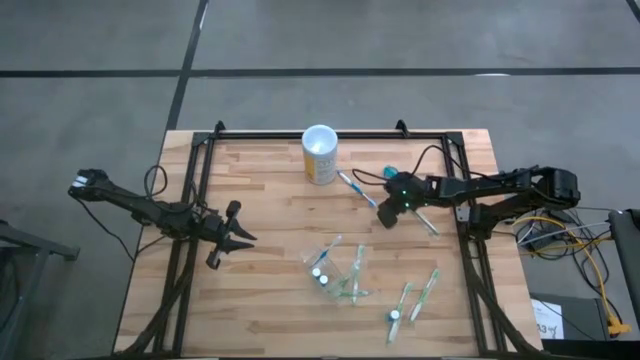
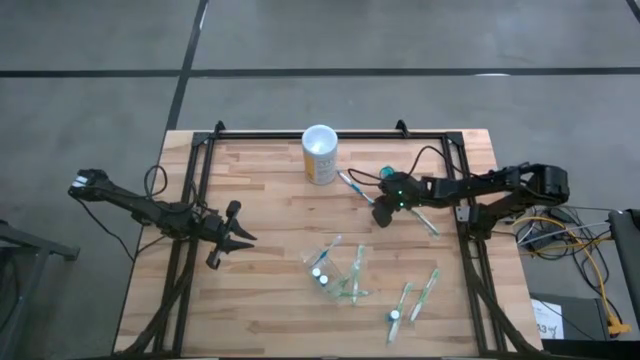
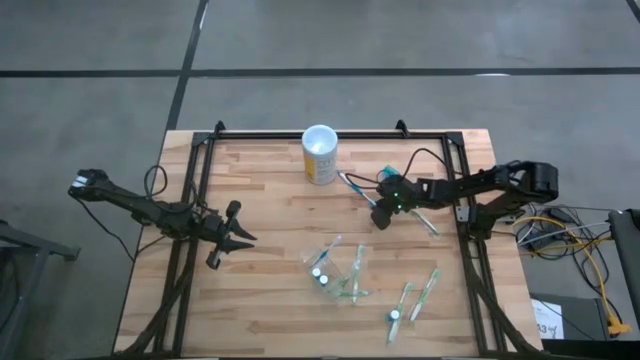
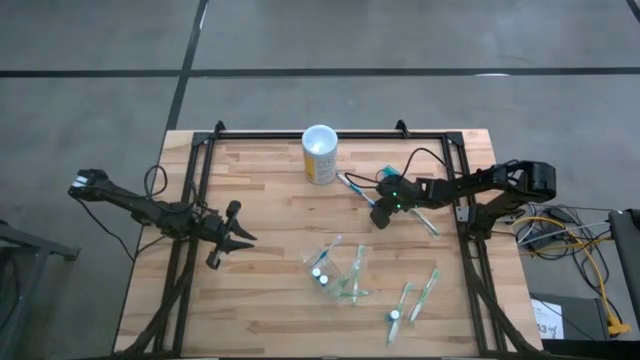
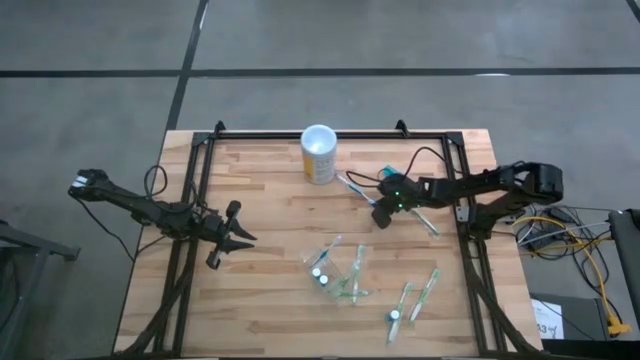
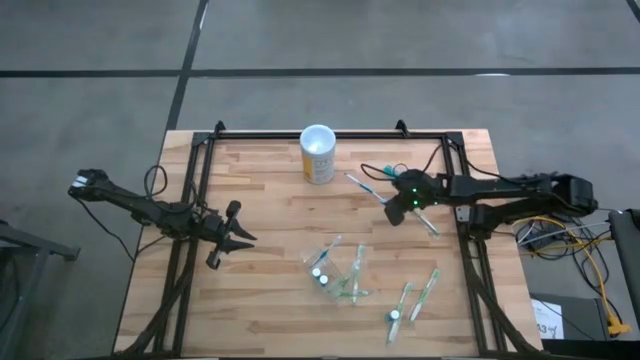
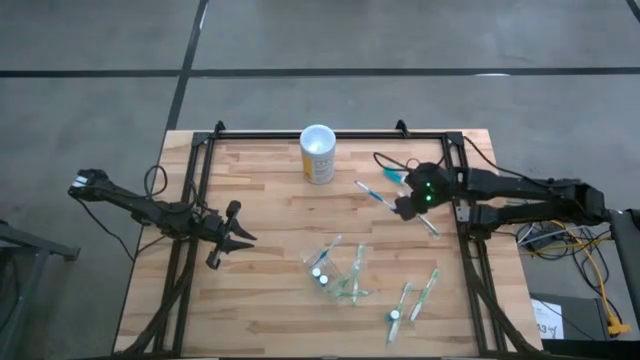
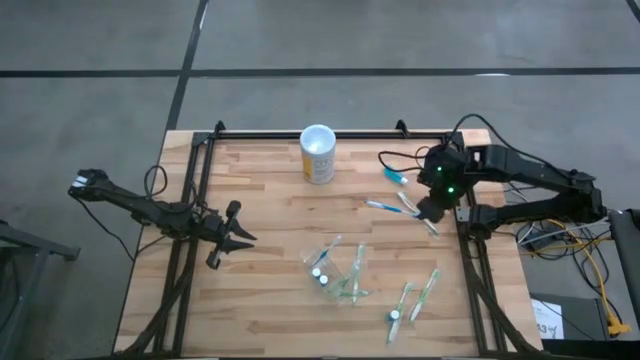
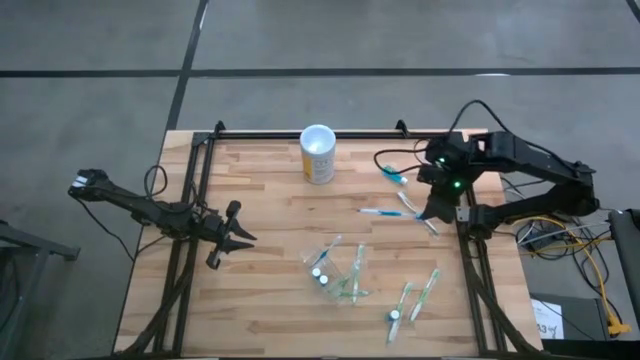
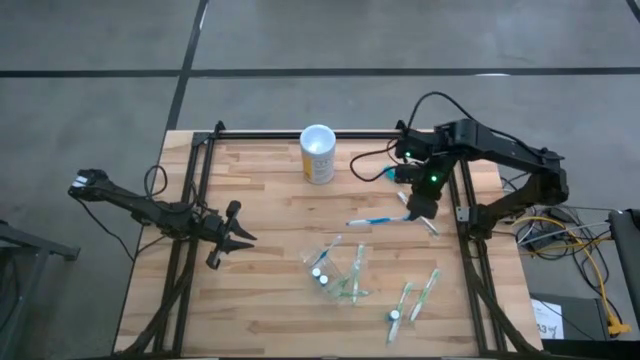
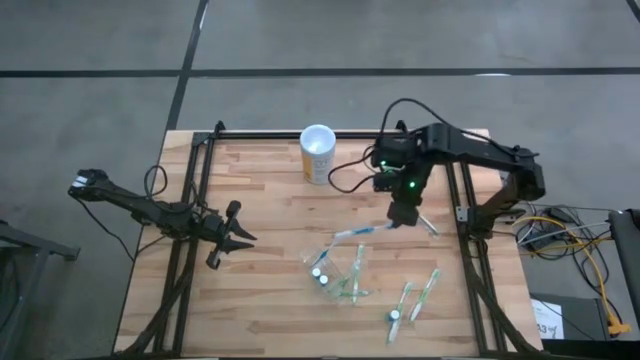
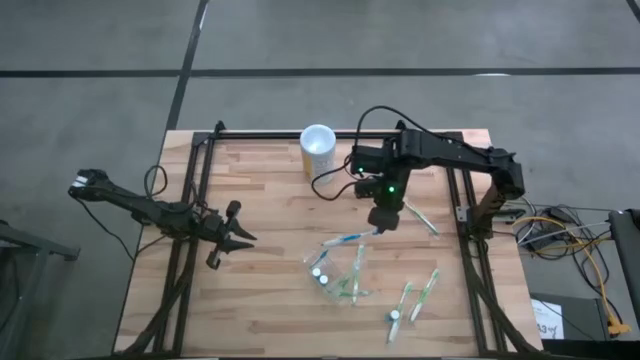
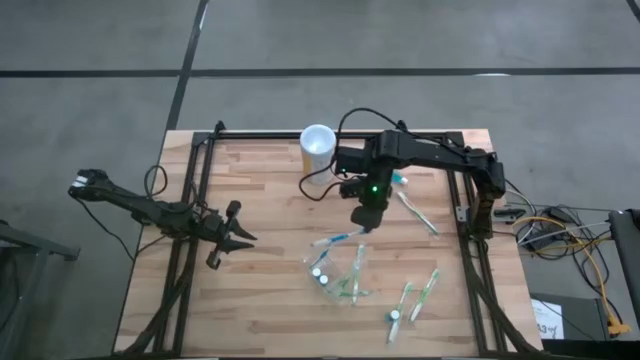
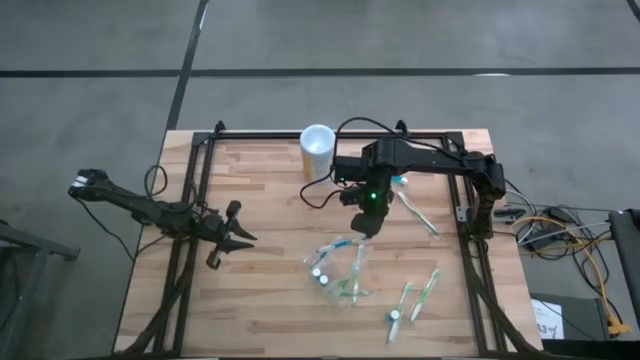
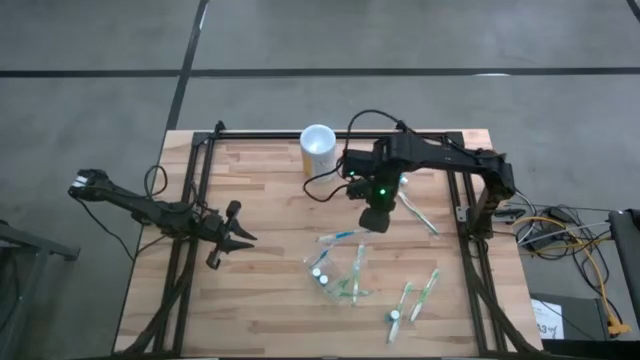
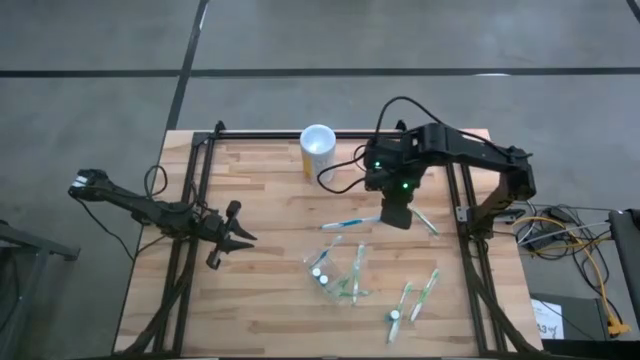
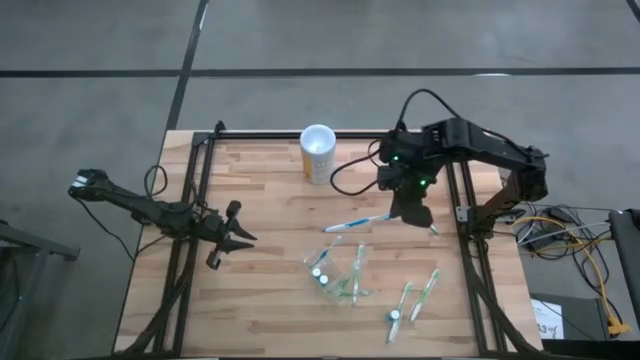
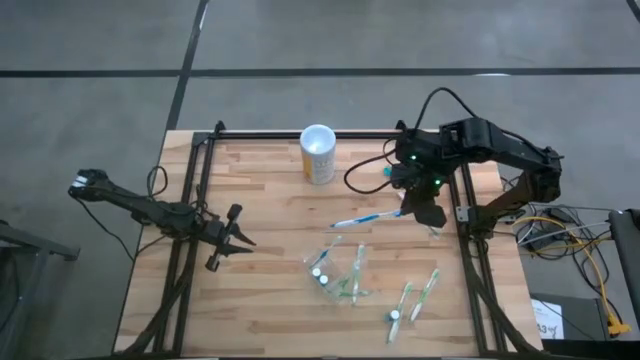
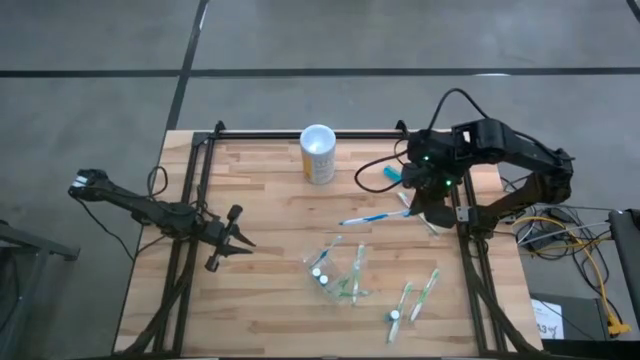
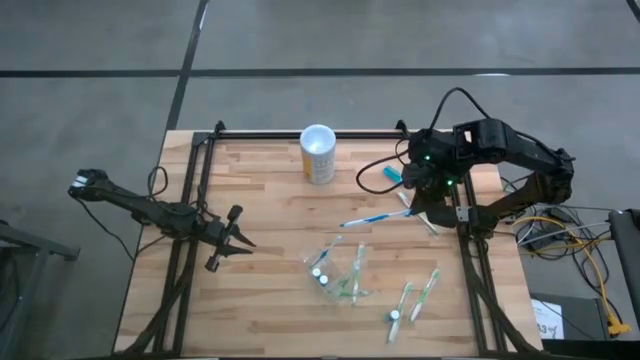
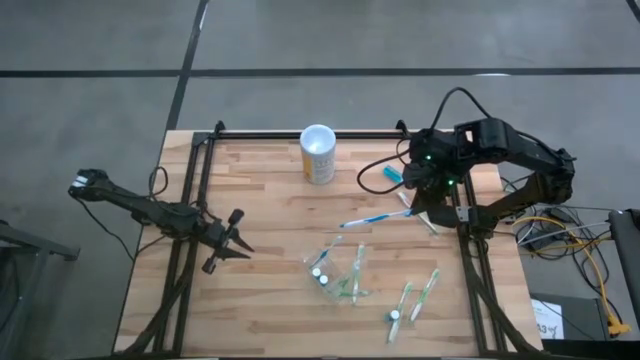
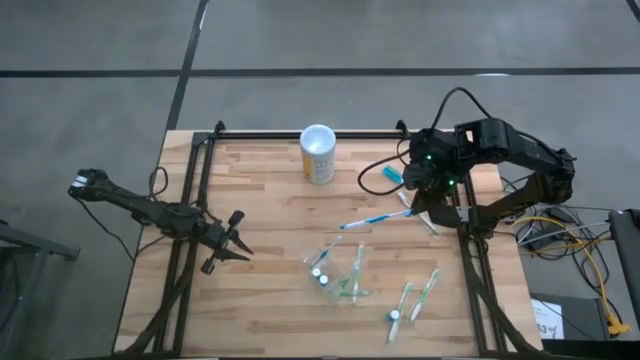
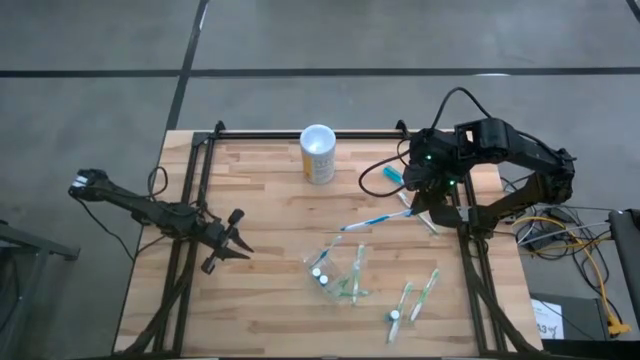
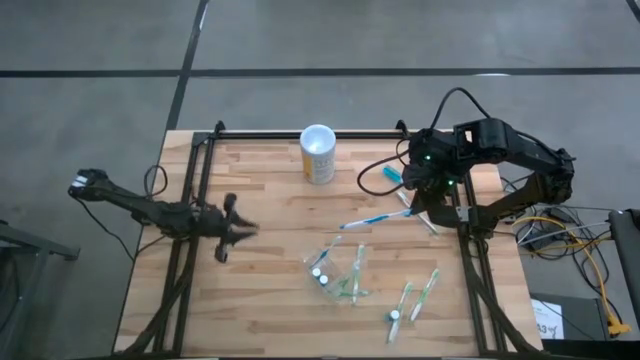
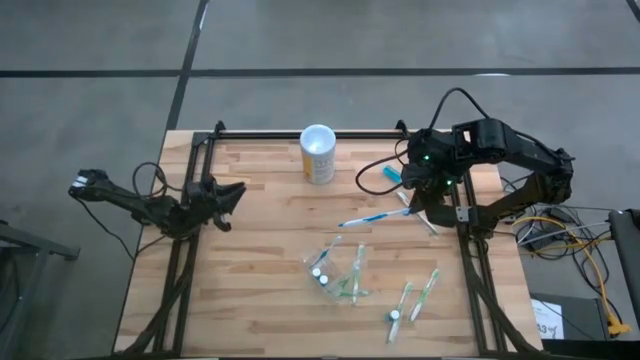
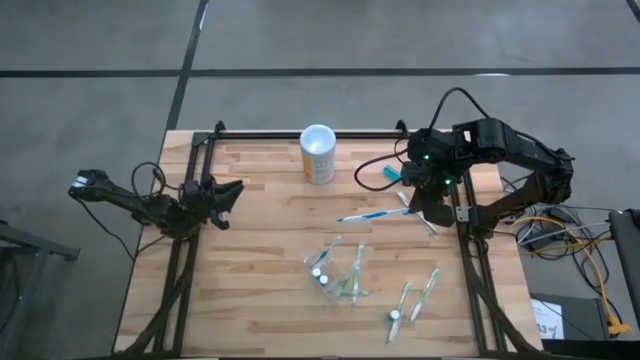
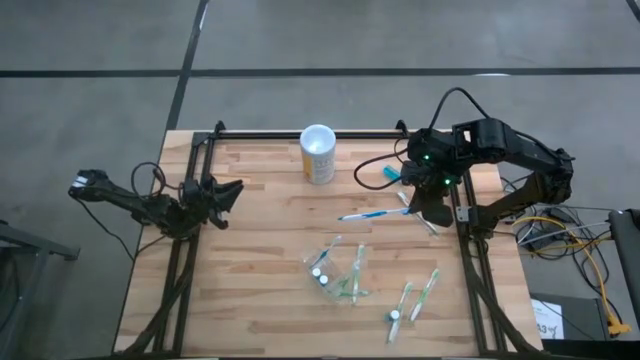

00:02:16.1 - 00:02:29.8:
Task: Pick & Place toothbrushing station
Put the blue toothbrush into the left section of the transparent organizer

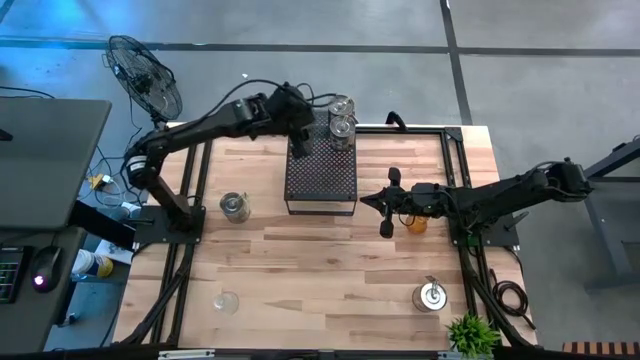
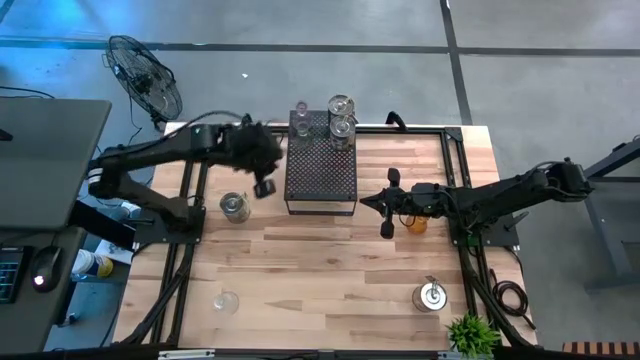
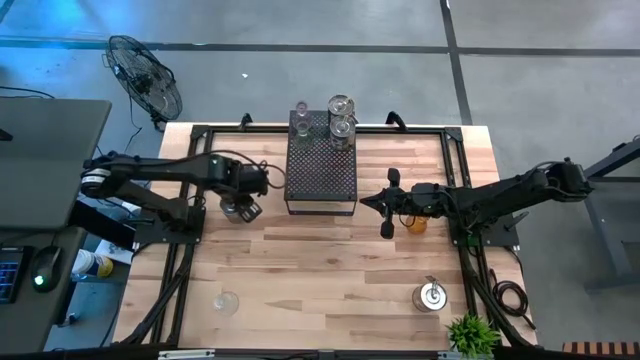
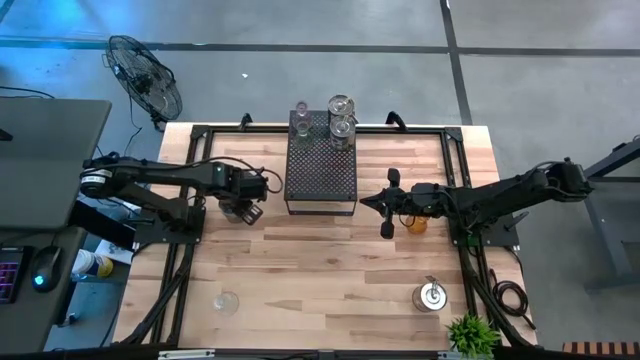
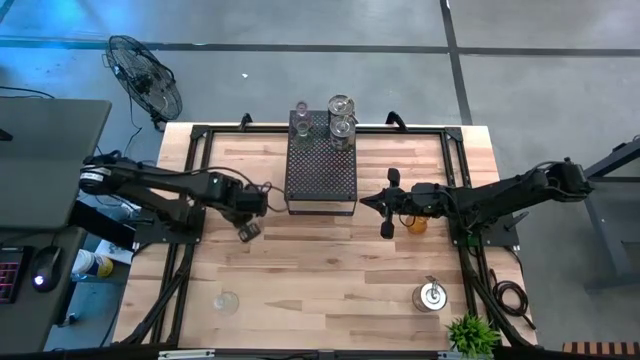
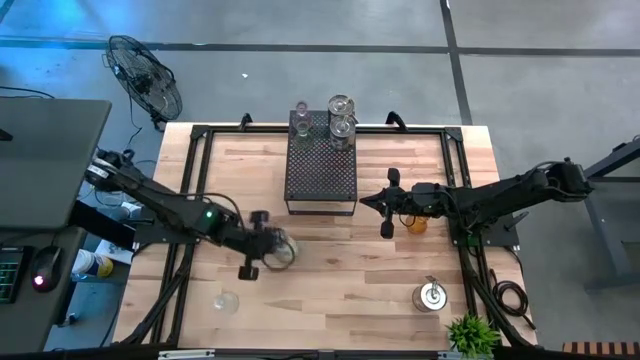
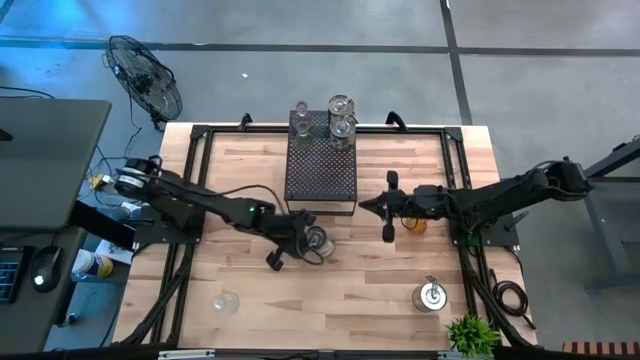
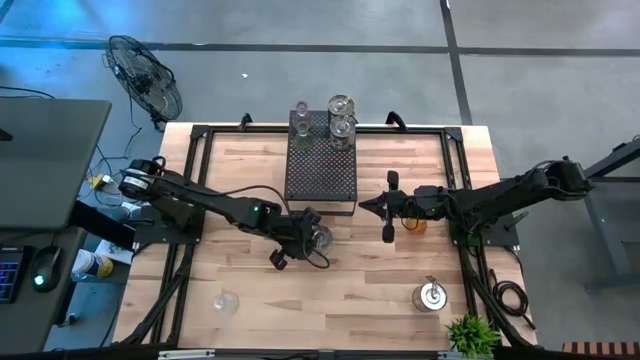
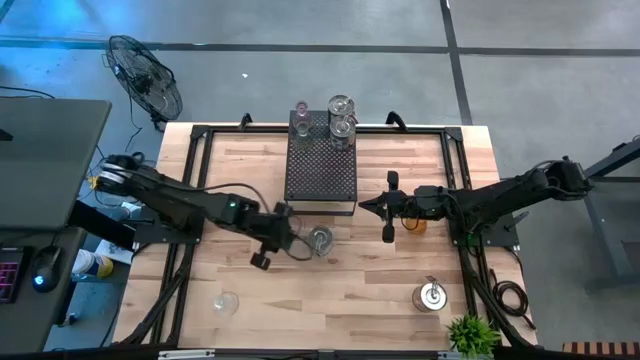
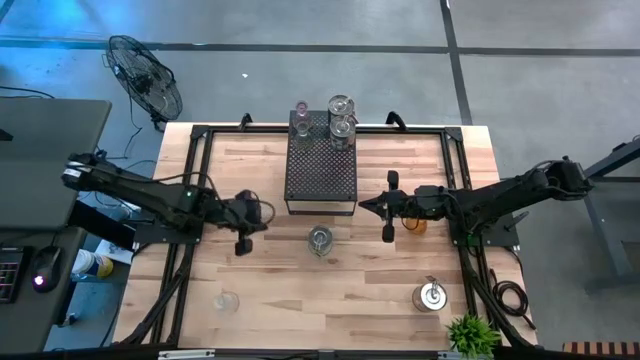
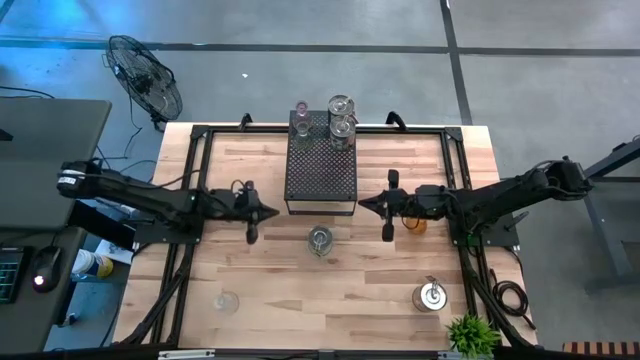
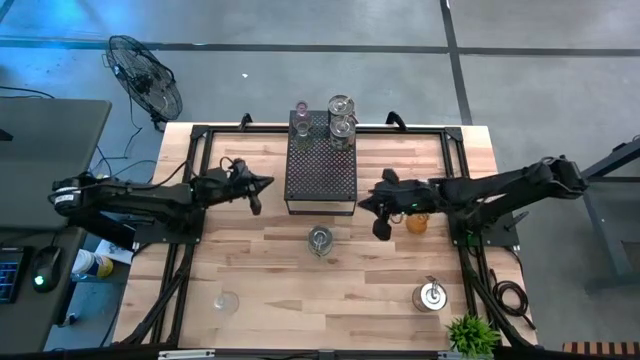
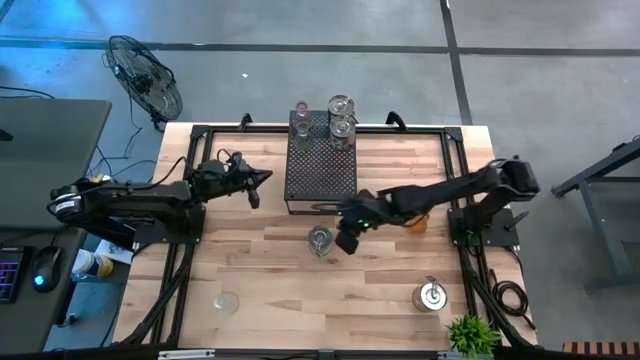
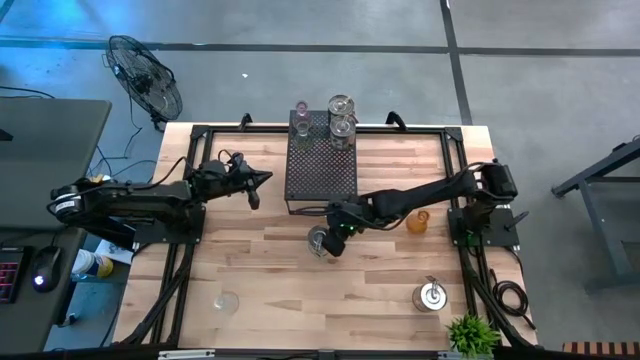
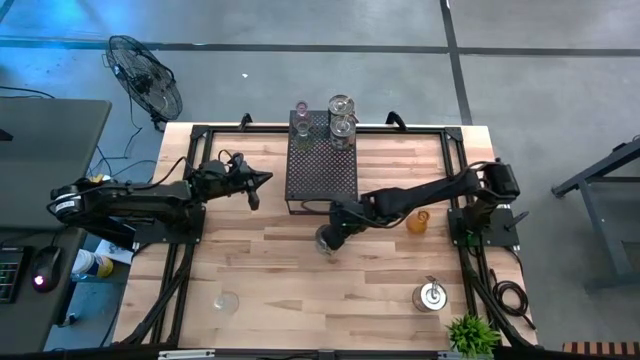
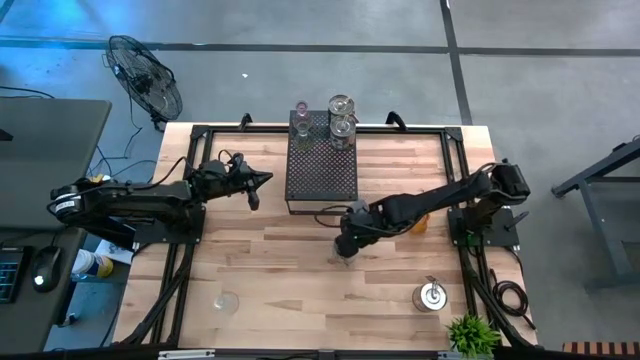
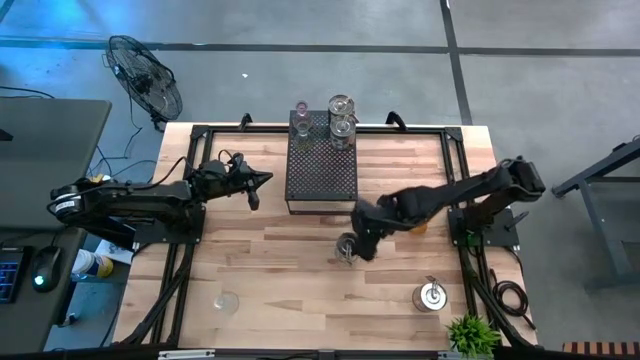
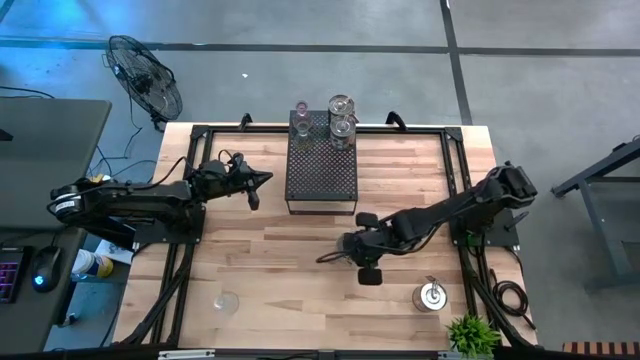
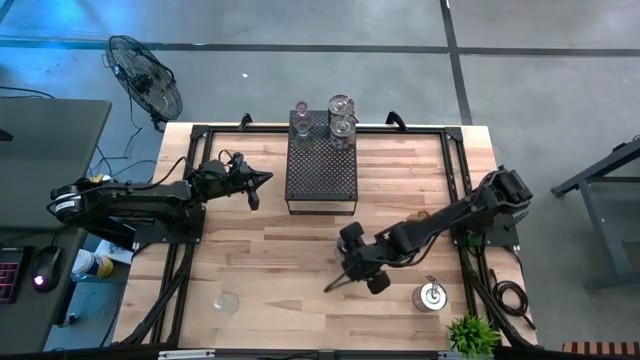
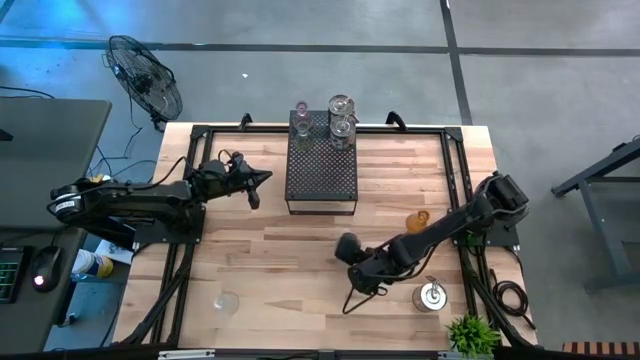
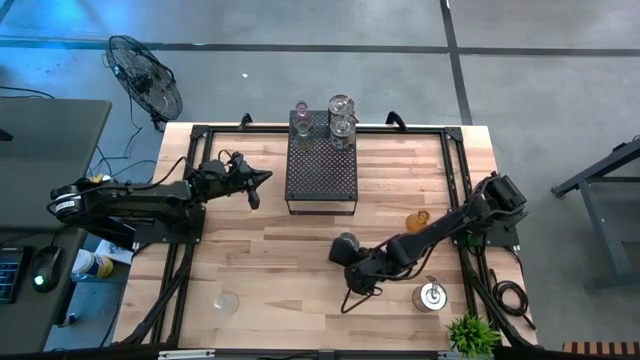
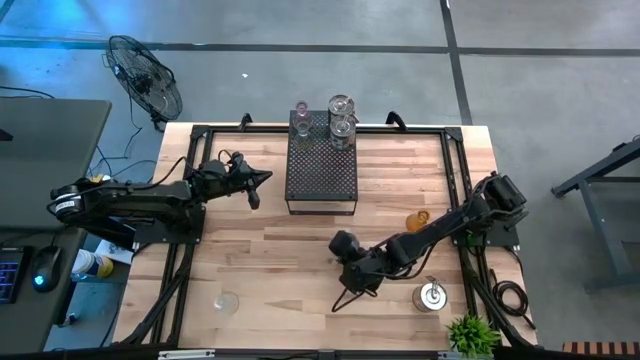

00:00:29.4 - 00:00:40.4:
Task: Pick & Place candle stick holders
Put the scented candle holder on the shelf
